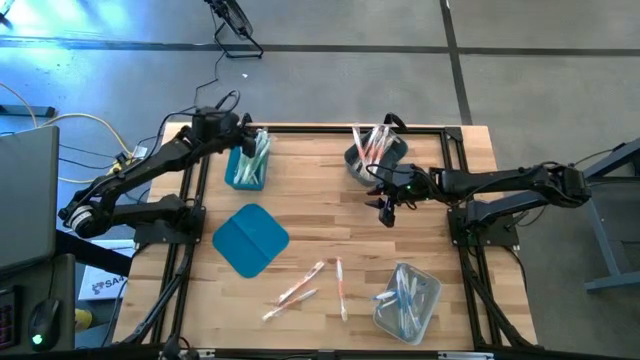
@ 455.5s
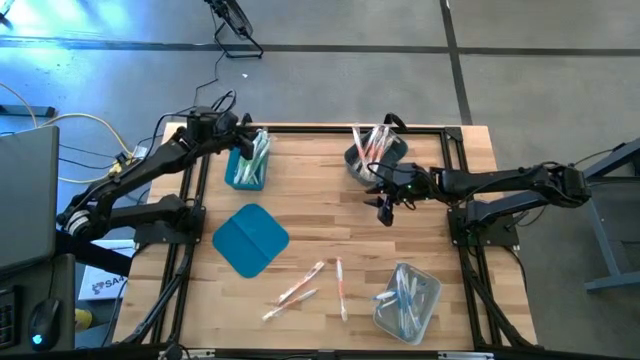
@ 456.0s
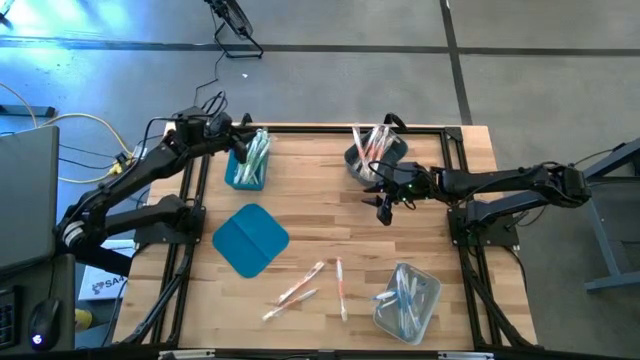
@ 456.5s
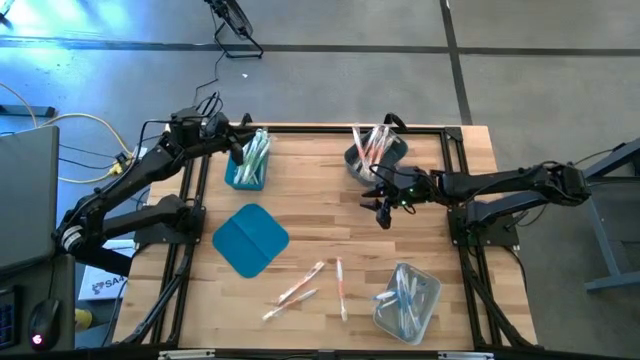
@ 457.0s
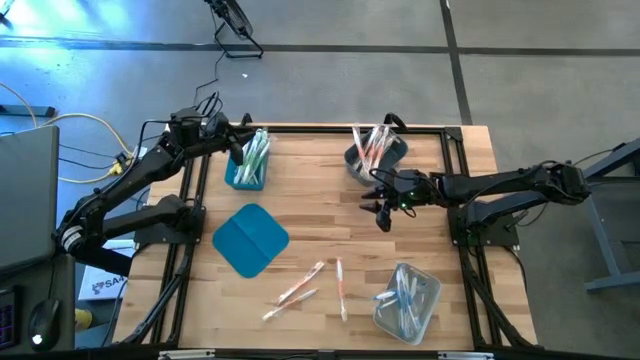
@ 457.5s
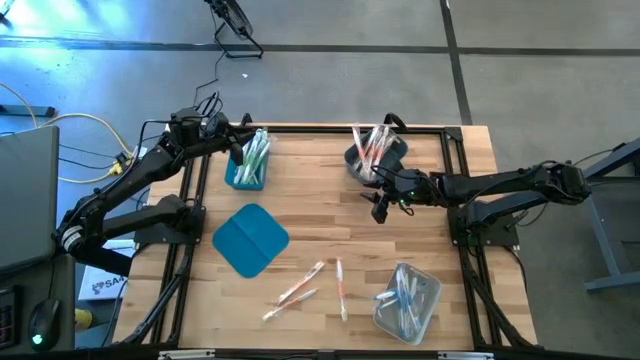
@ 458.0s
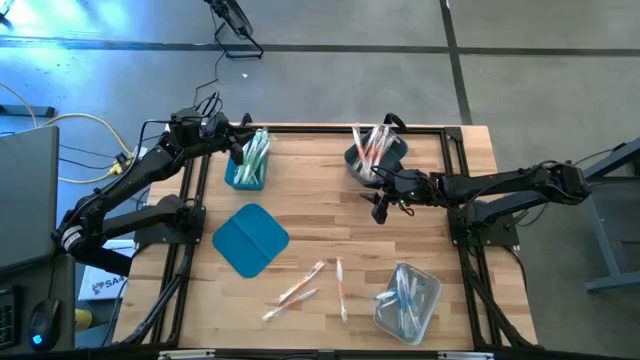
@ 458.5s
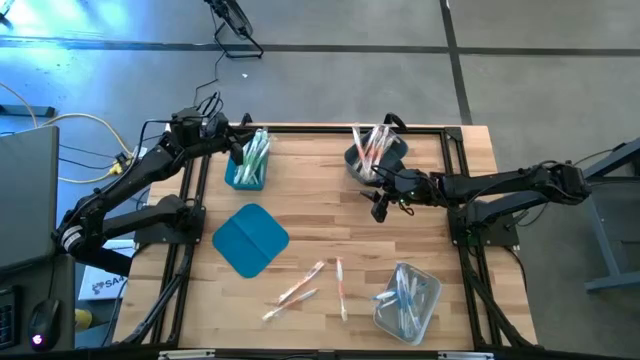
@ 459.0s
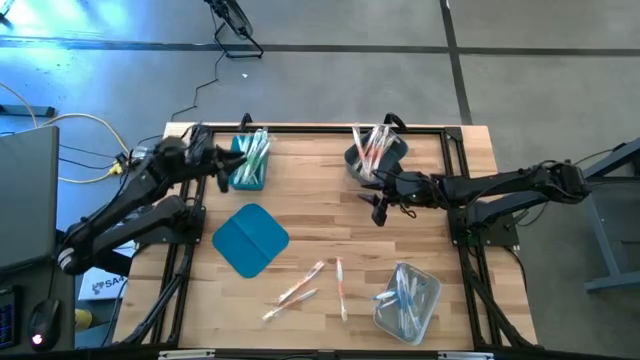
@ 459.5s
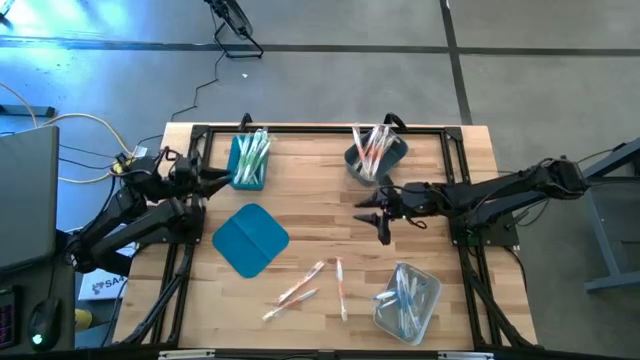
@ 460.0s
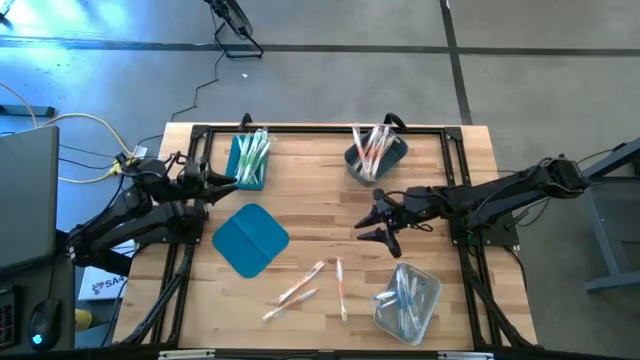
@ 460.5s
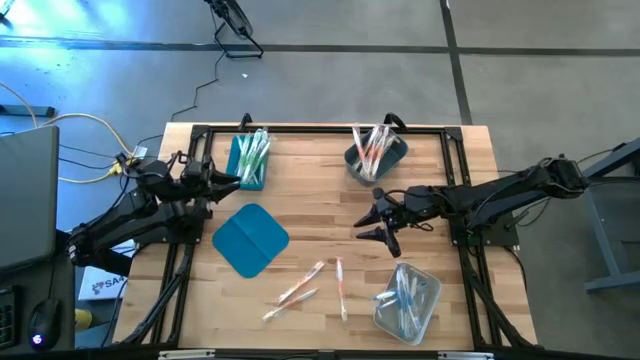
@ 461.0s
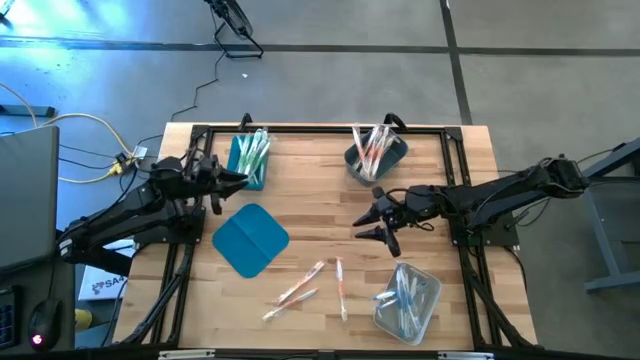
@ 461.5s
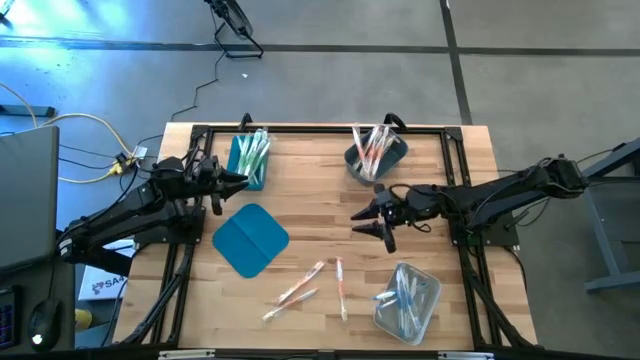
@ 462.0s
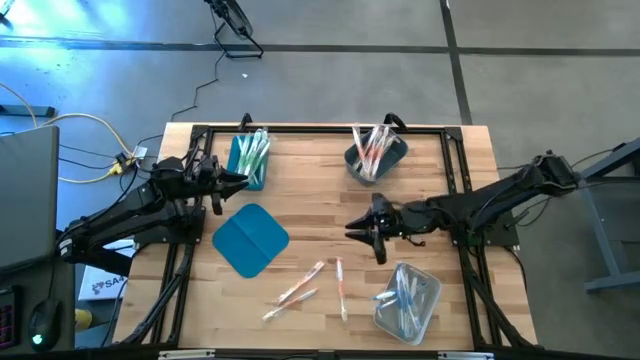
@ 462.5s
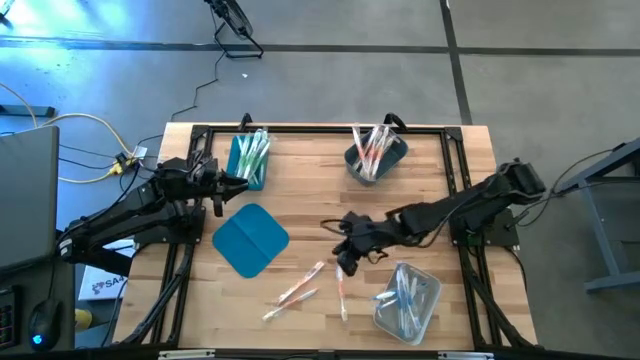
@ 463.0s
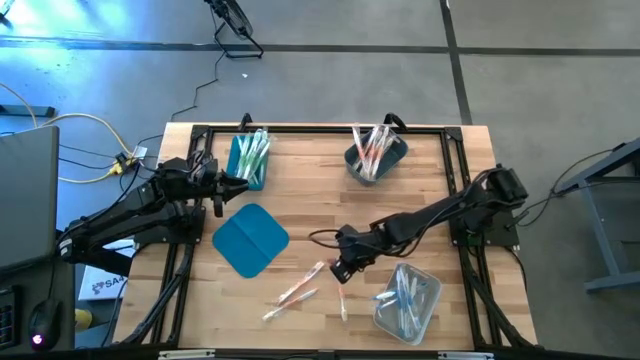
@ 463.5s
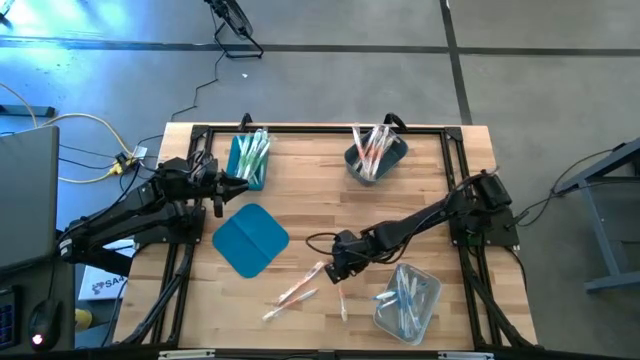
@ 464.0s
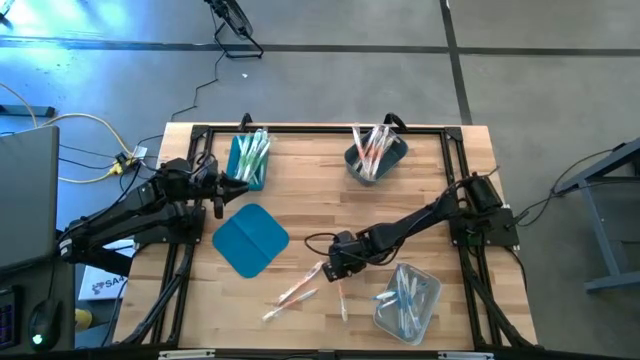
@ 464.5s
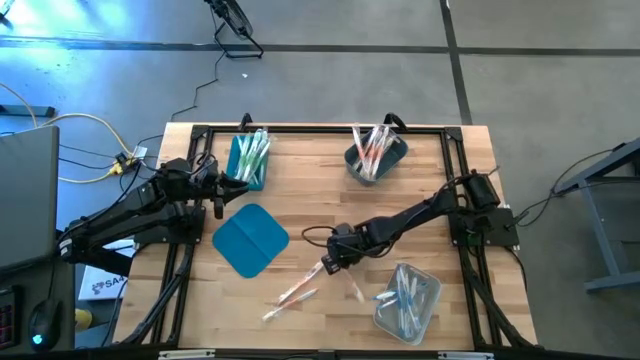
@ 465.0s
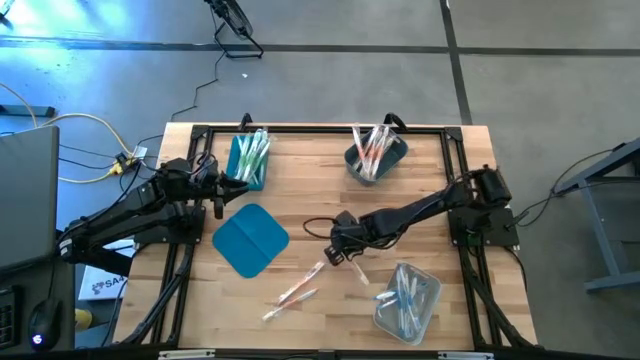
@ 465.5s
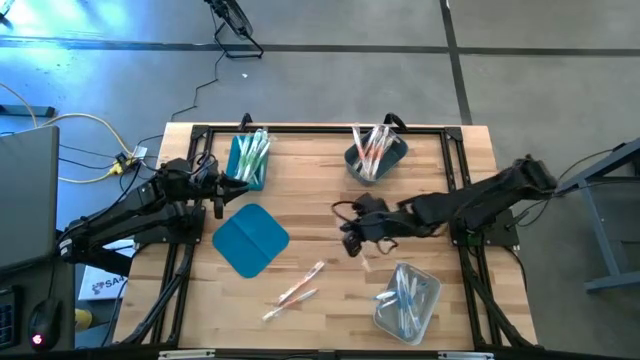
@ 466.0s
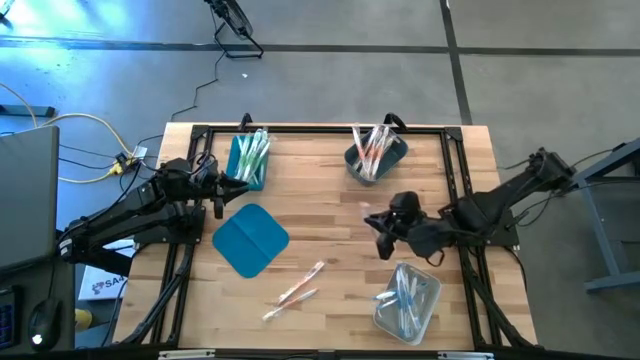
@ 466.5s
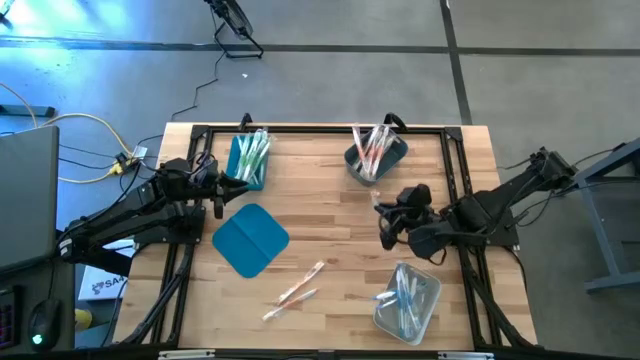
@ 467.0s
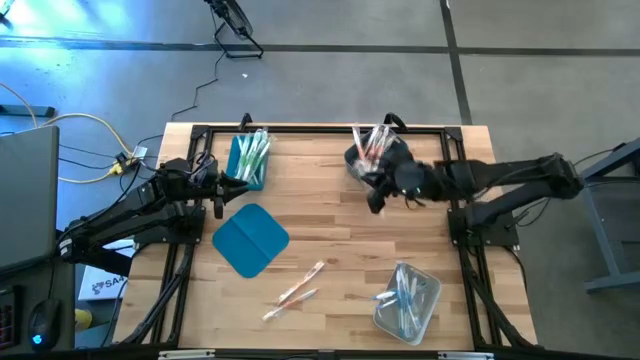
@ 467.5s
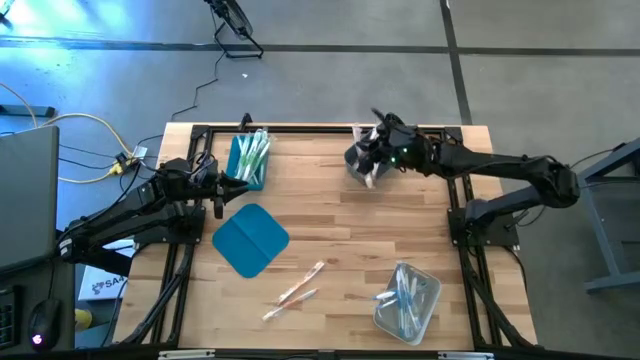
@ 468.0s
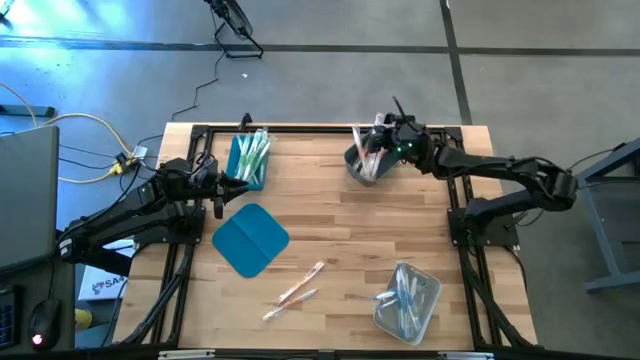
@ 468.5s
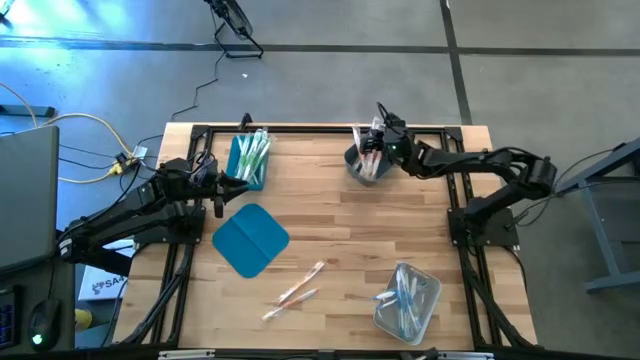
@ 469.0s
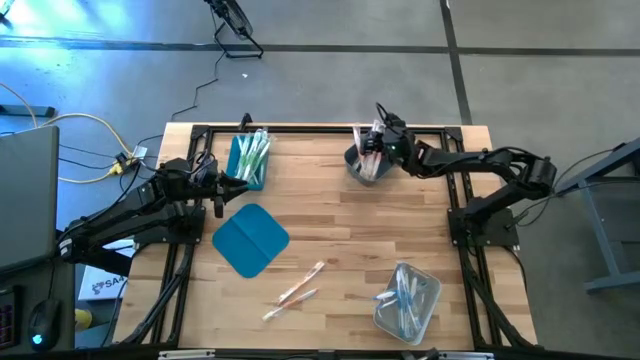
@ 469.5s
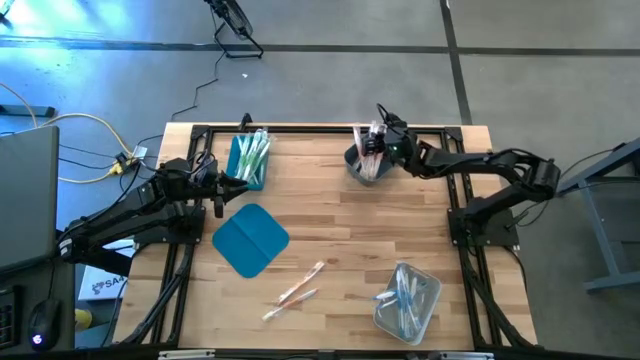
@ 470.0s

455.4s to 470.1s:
Task: Pick & Place Toothbrushes
Put the right orange toothbrush into the dark gray bin

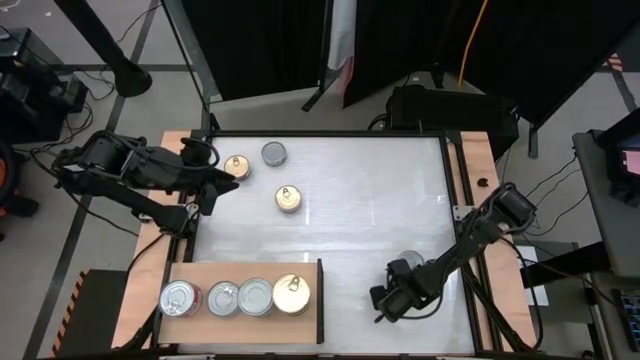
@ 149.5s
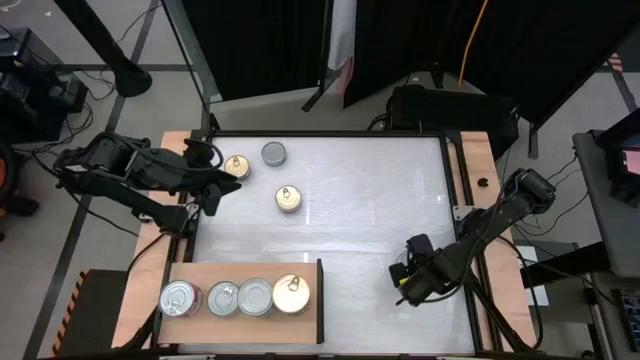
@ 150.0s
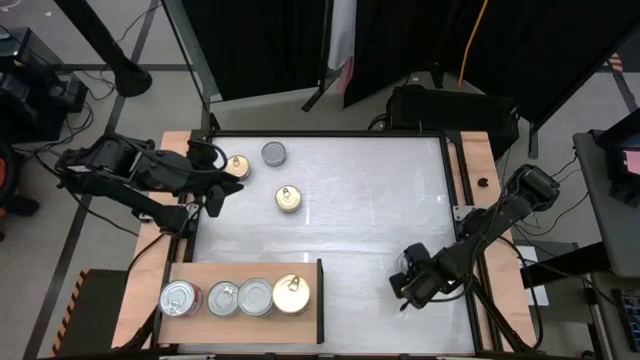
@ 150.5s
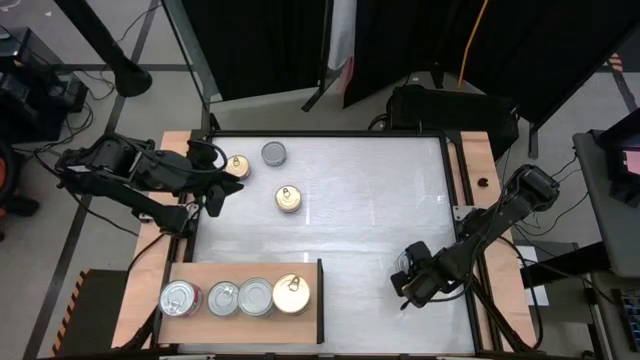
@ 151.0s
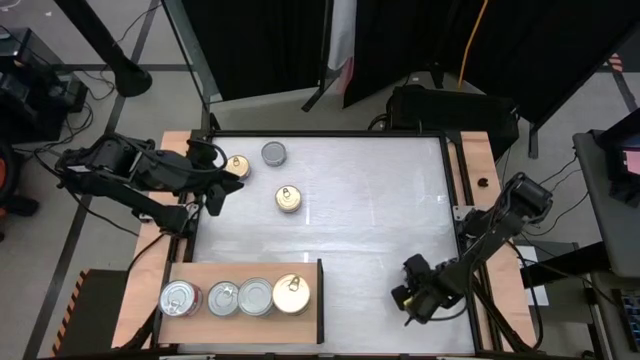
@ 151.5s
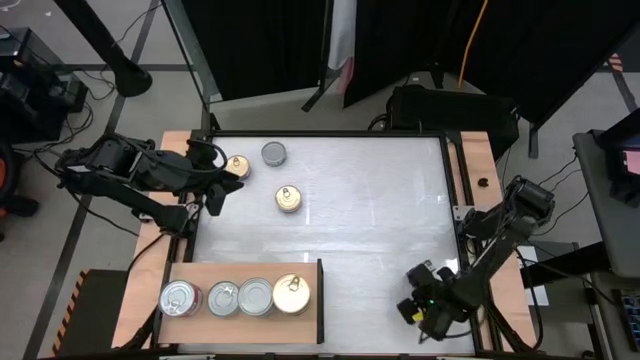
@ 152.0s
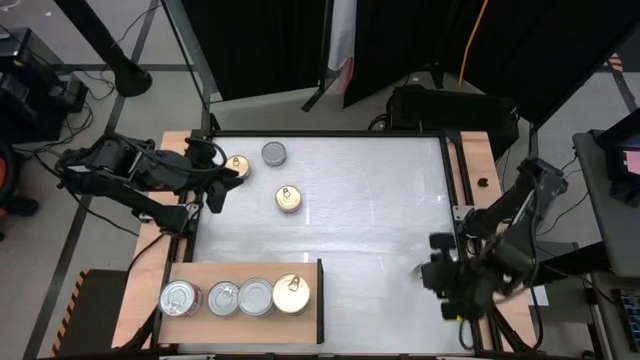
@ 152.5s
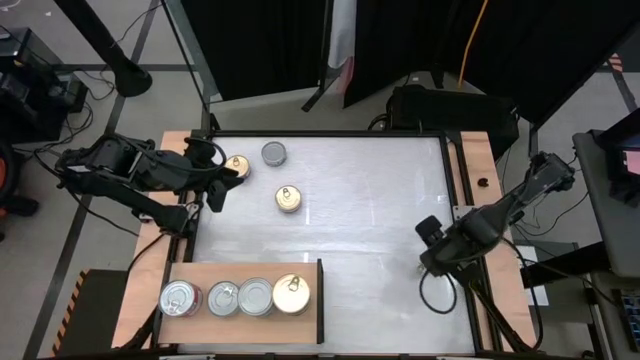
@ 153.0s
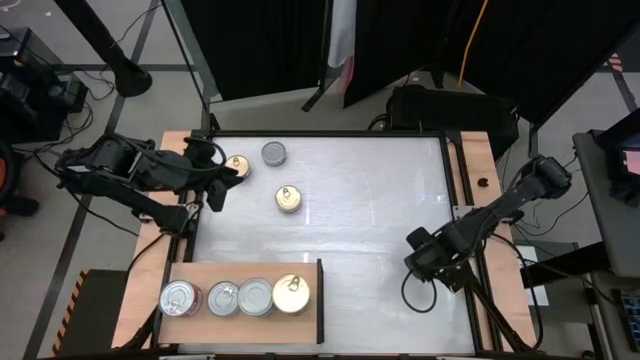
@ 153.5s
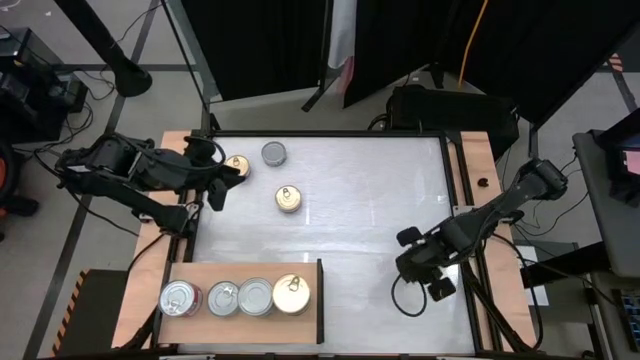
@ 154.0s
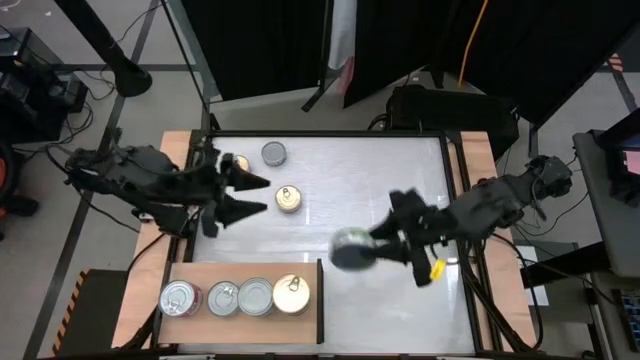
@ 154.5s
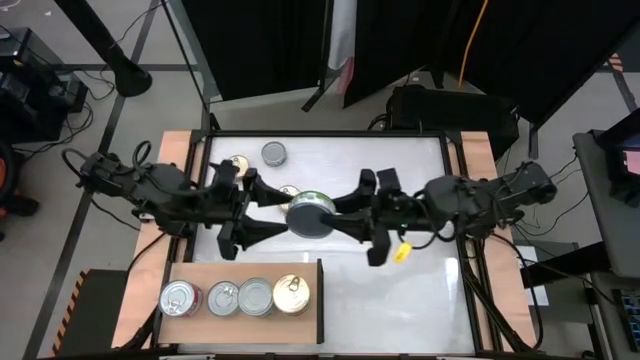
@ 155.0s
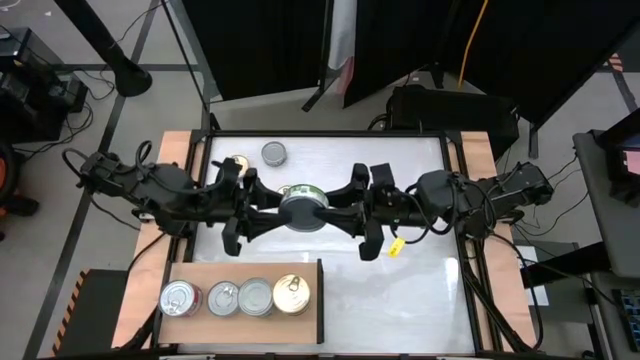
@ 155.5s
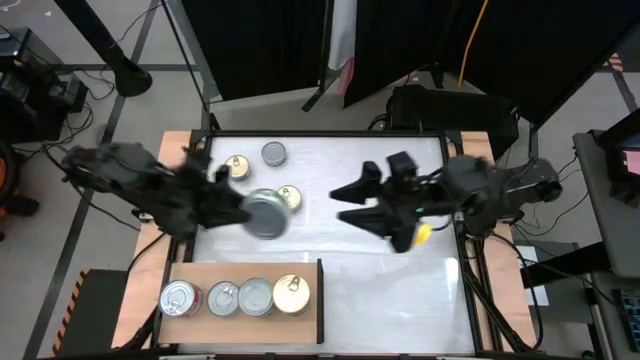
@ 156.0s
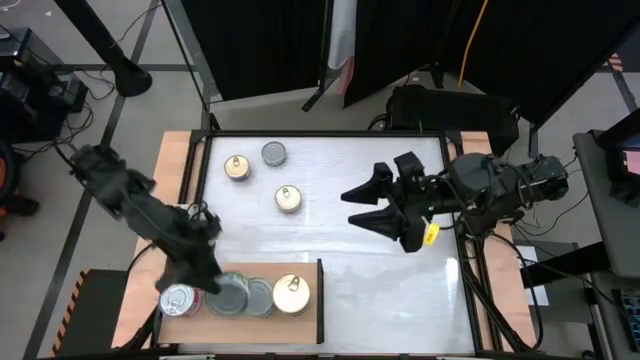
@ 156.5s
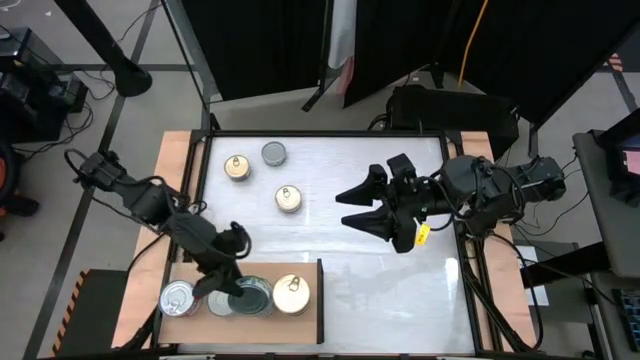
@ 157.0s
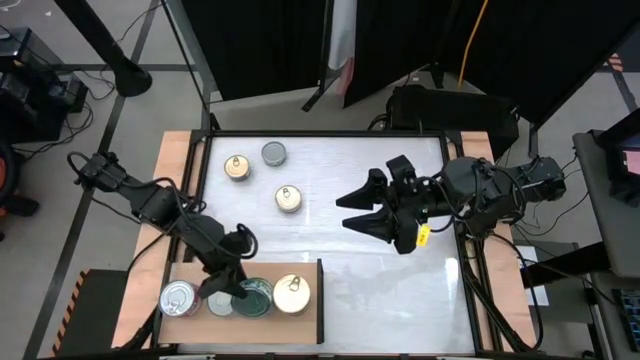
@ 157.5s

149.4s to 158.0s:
Task: Stack canned seafood by type on shelf
Stack the green white tuna can on top of the other green white tuna cans on the shelf
